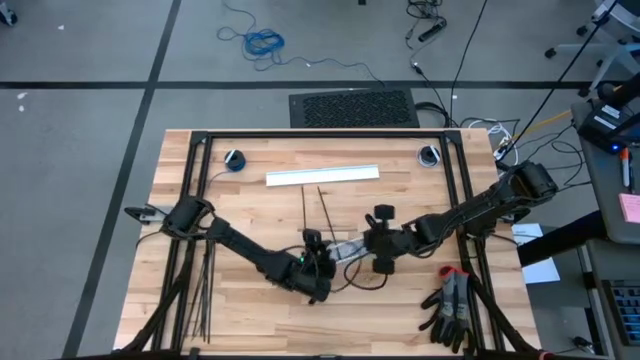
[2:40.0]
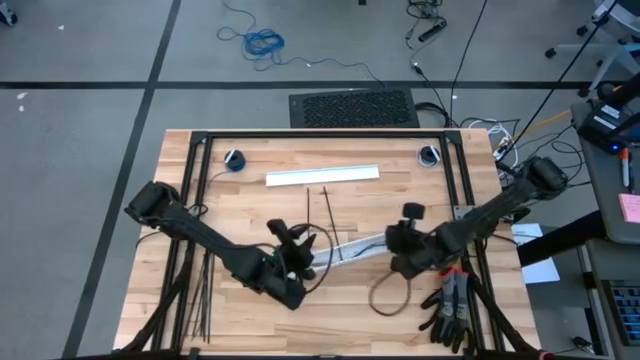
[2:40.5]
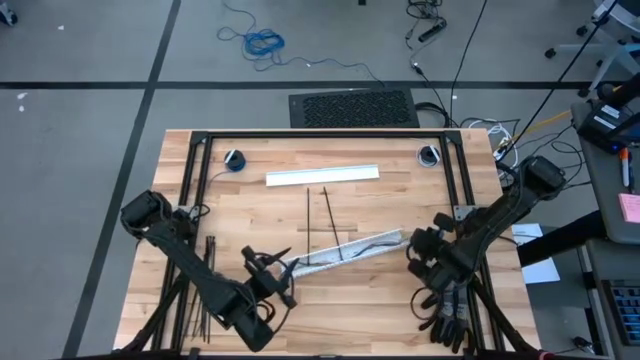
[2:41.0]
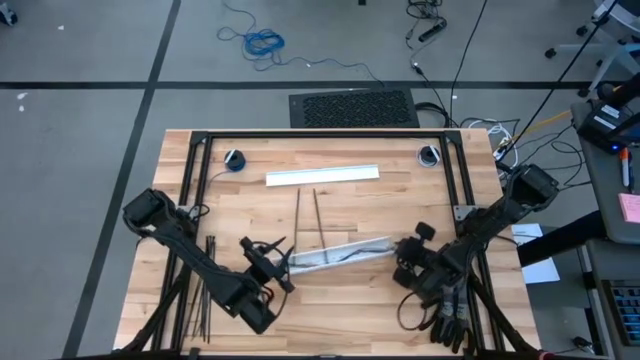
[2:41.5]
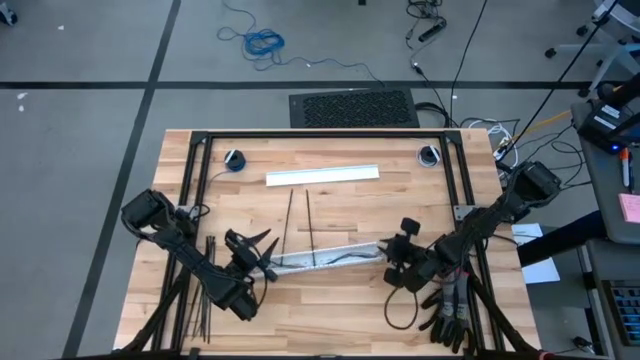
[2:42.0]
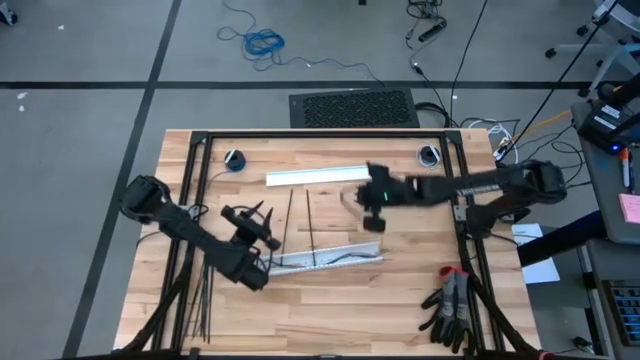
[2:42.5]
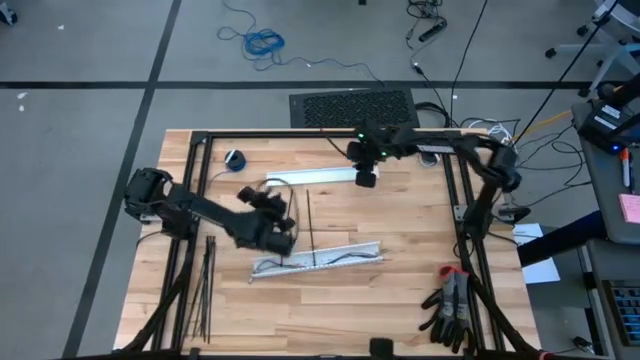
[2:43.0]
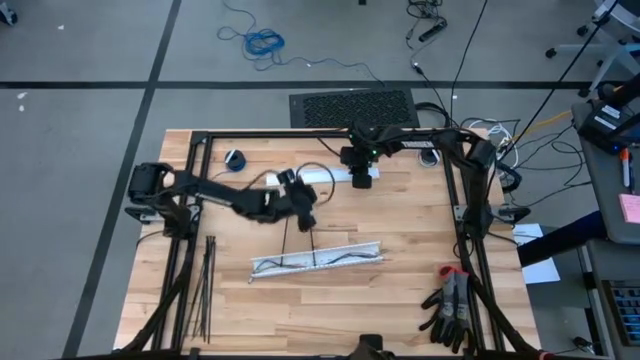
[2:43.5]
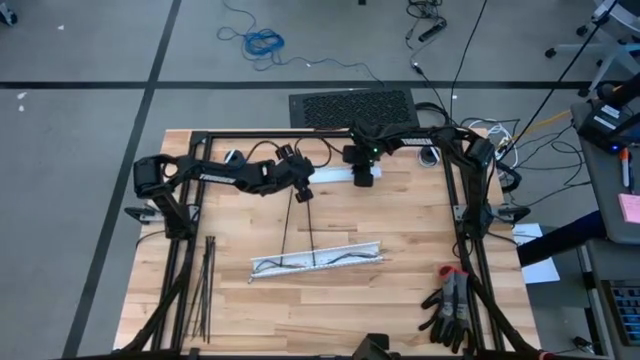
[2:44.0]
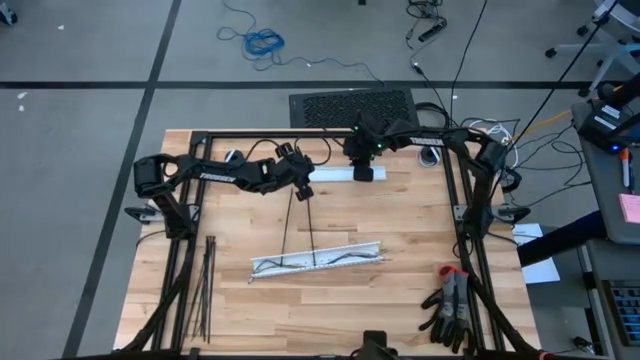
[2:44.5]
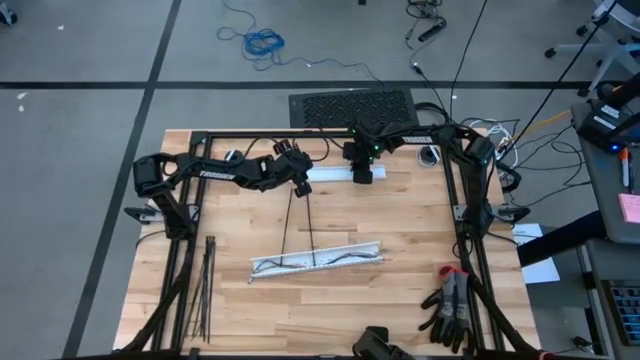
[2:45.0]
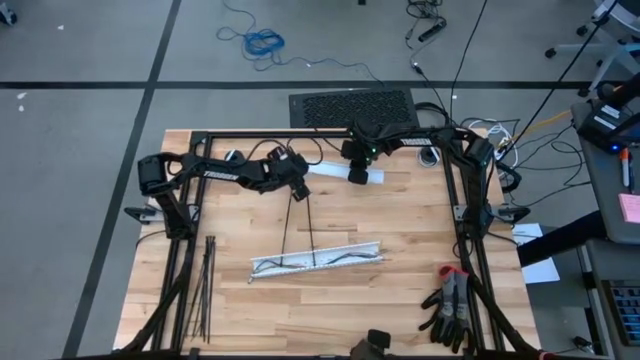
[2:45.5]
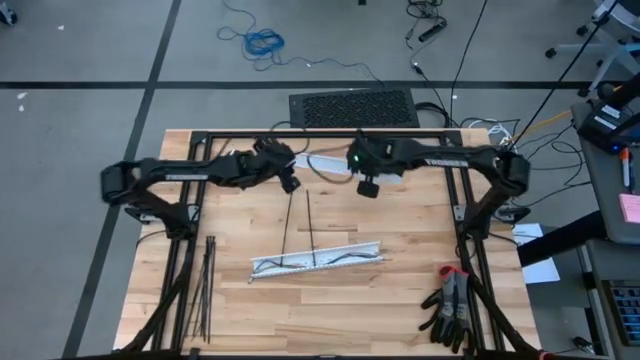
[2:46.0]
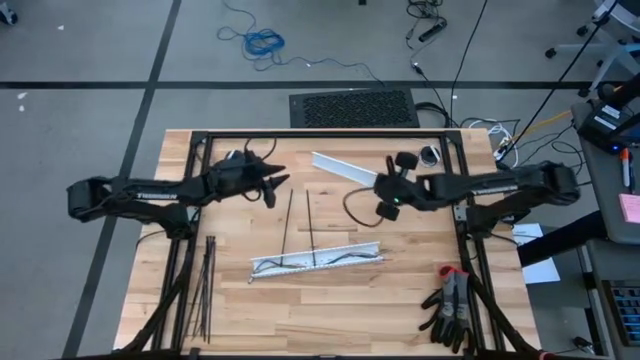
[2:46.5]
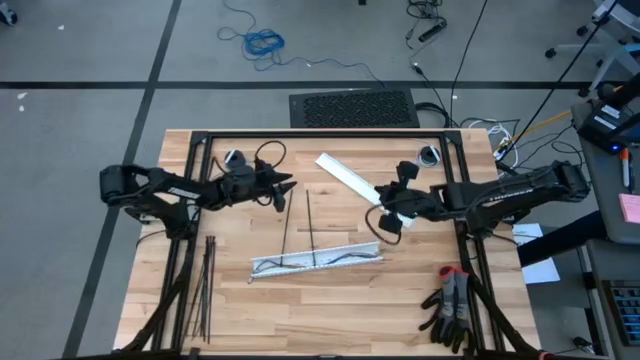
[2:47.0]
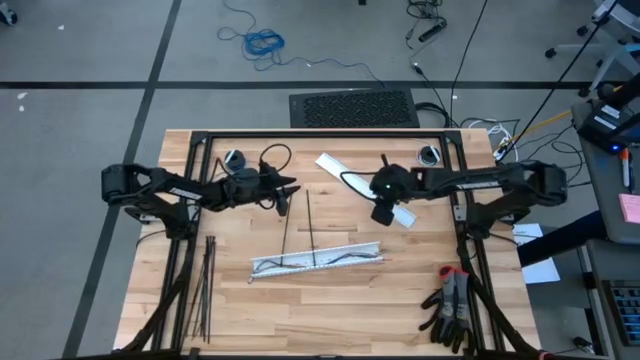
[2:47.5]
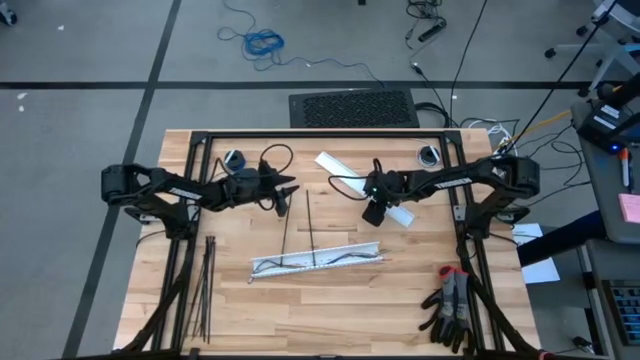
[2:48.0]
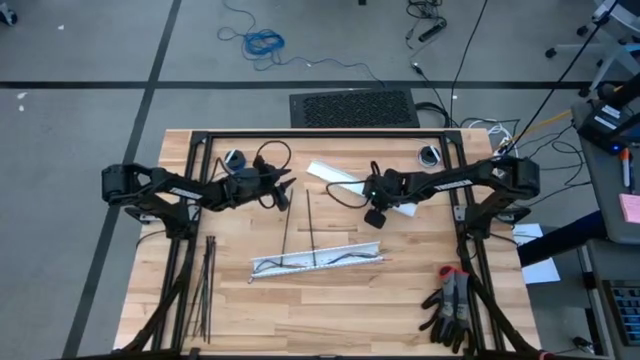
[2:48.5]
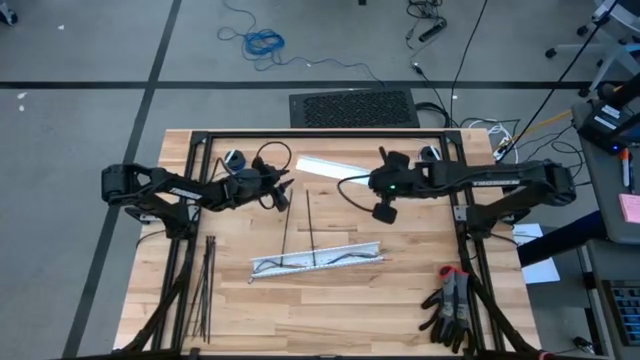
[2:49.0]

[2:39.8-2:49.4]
Task: Ziptie cables
Close the white cable duct

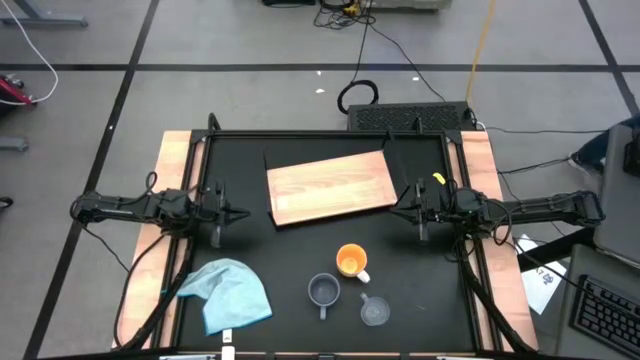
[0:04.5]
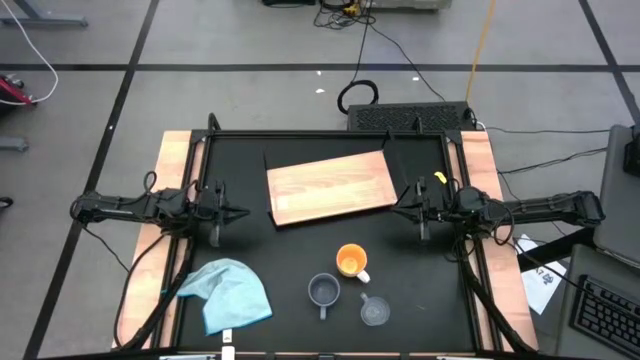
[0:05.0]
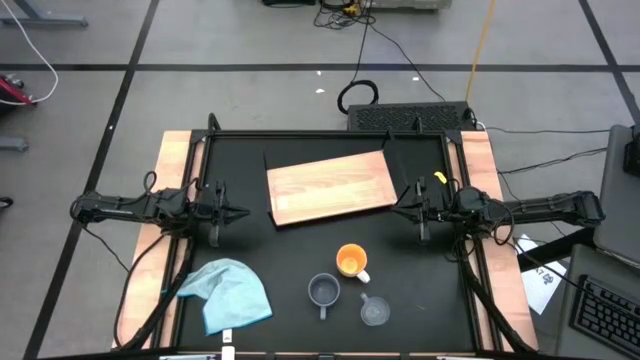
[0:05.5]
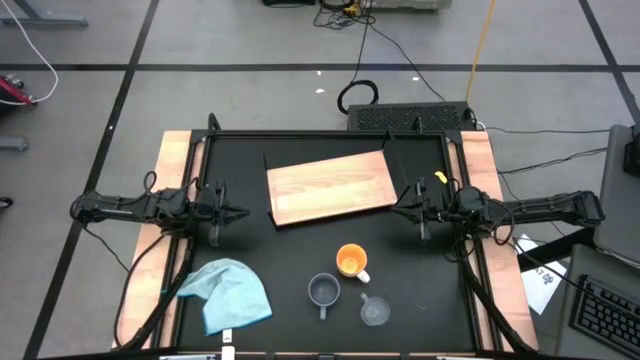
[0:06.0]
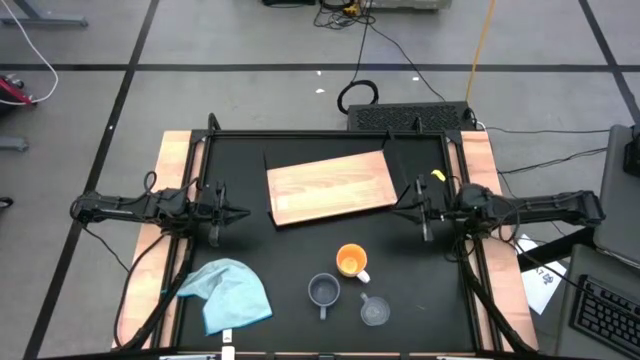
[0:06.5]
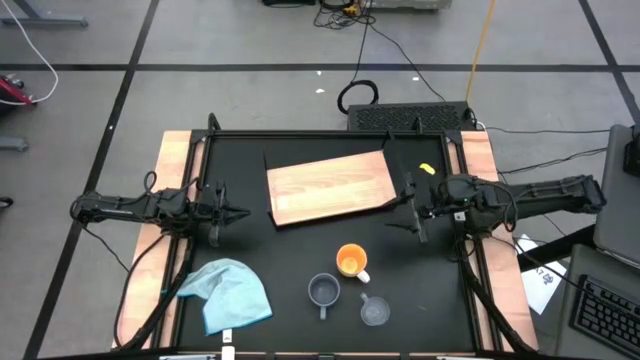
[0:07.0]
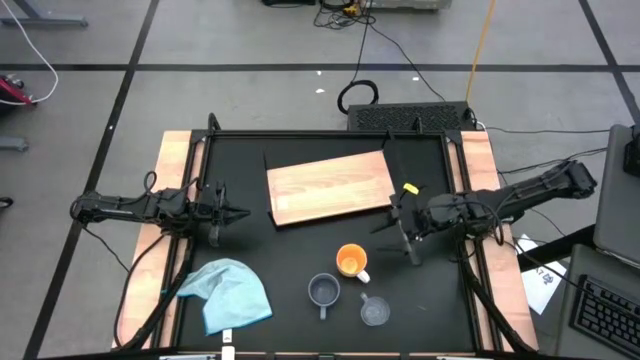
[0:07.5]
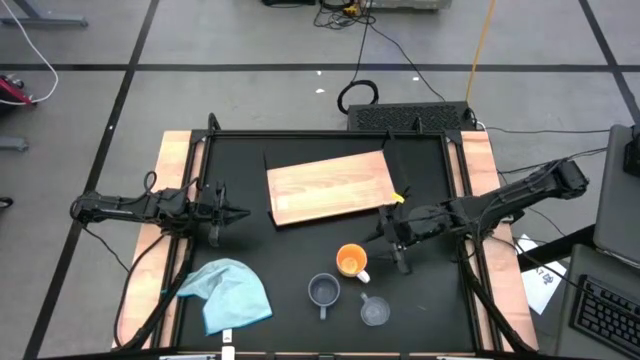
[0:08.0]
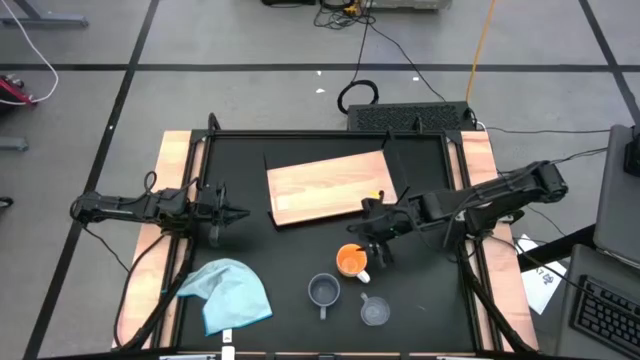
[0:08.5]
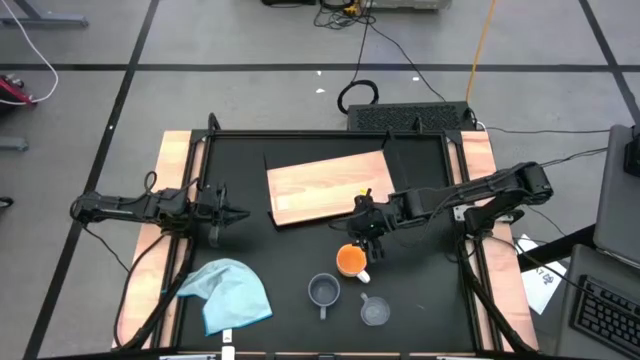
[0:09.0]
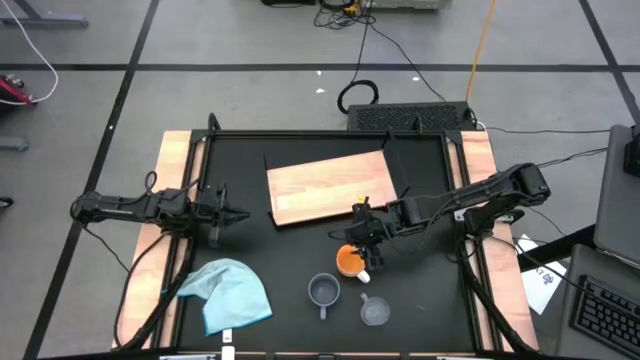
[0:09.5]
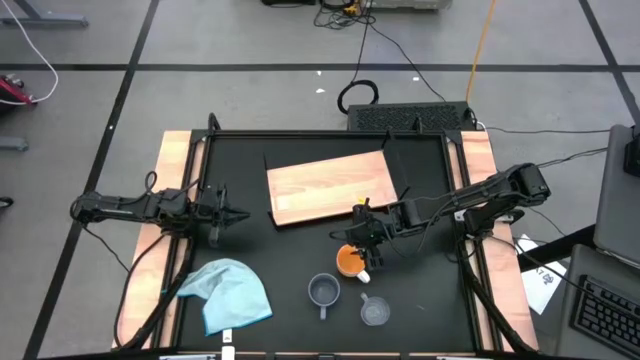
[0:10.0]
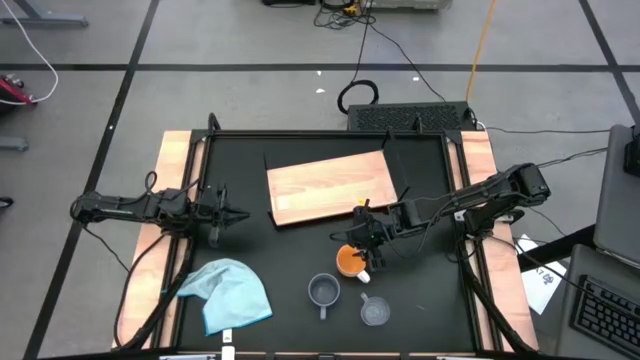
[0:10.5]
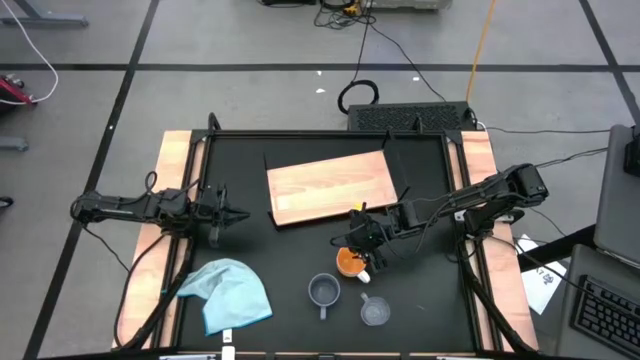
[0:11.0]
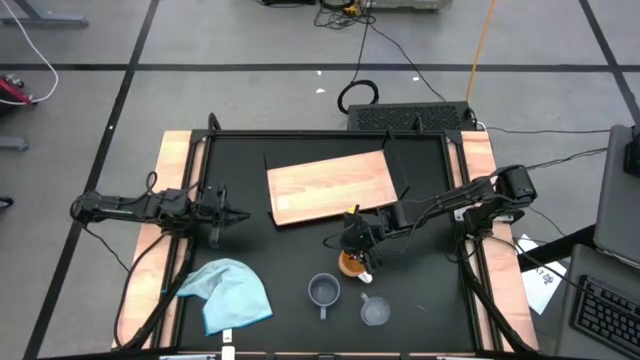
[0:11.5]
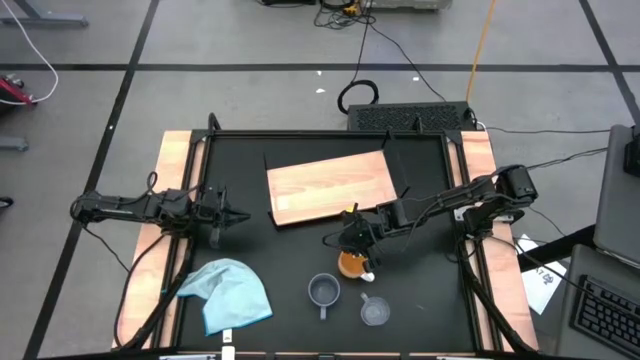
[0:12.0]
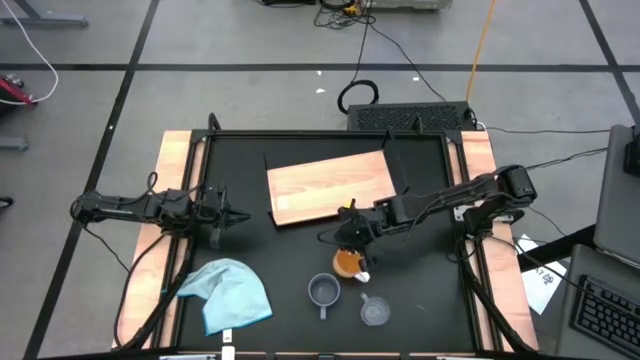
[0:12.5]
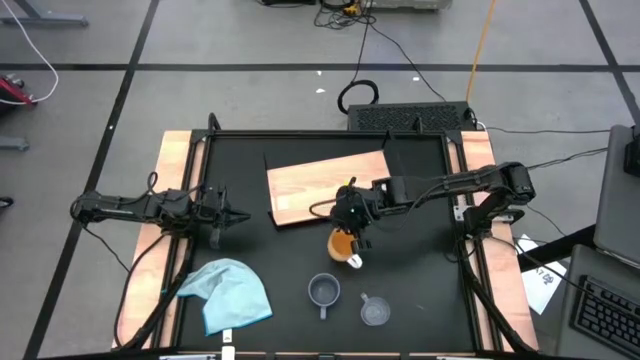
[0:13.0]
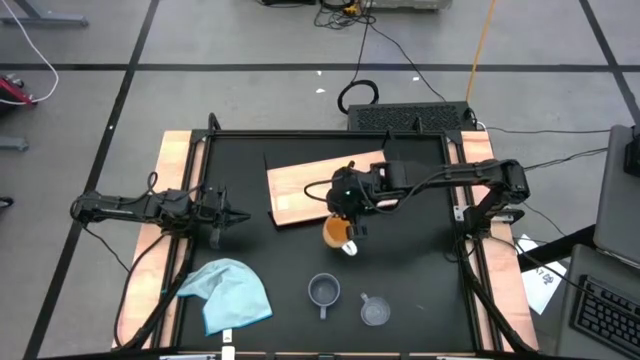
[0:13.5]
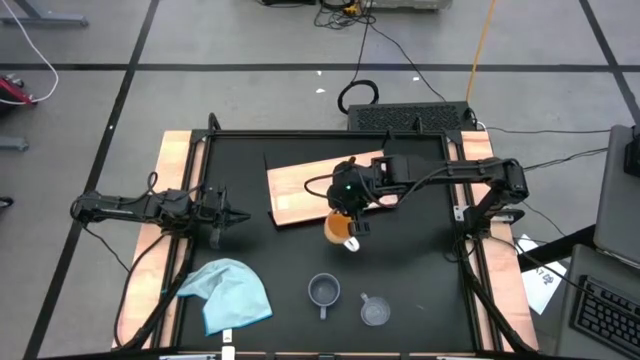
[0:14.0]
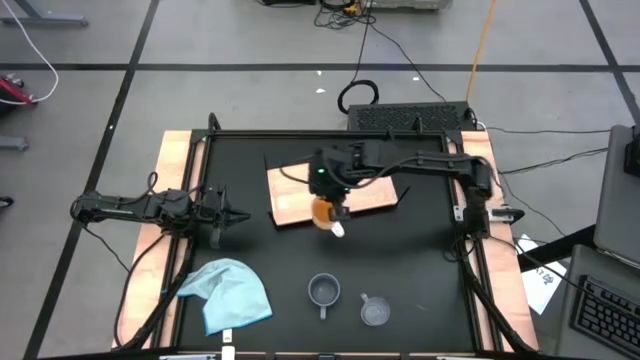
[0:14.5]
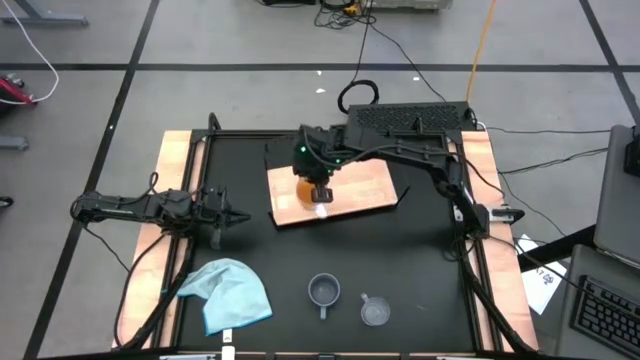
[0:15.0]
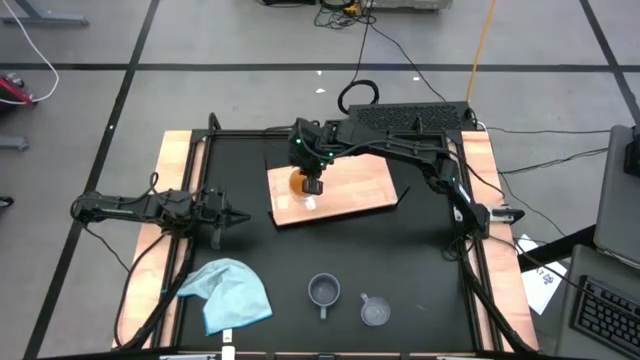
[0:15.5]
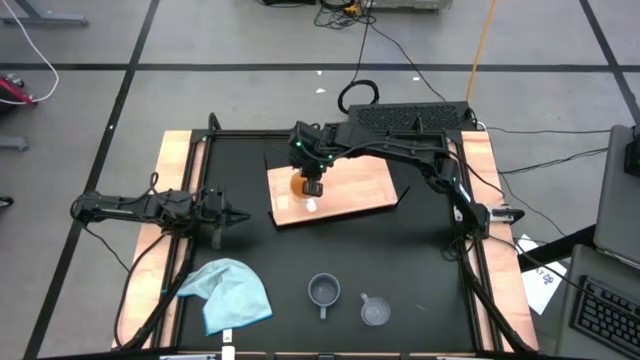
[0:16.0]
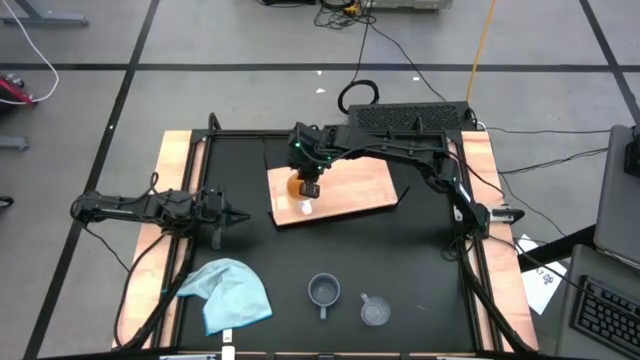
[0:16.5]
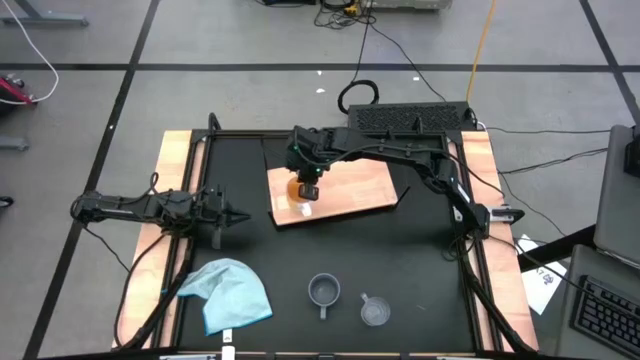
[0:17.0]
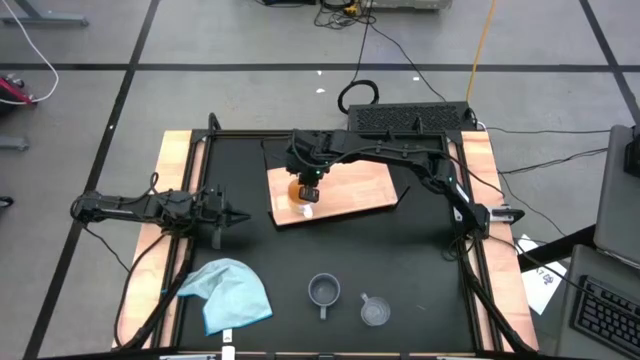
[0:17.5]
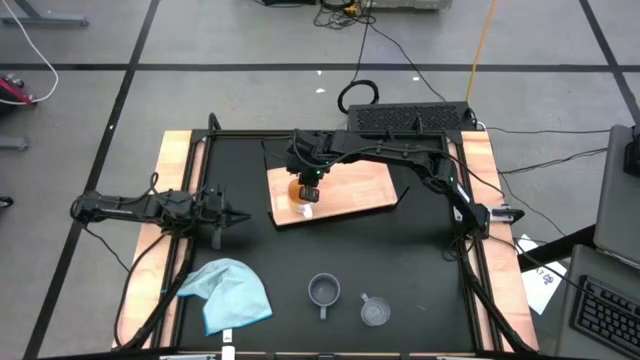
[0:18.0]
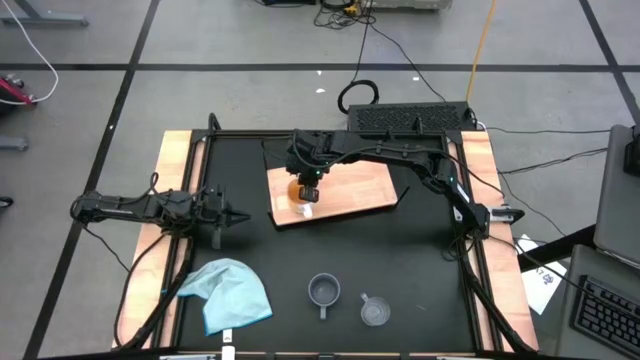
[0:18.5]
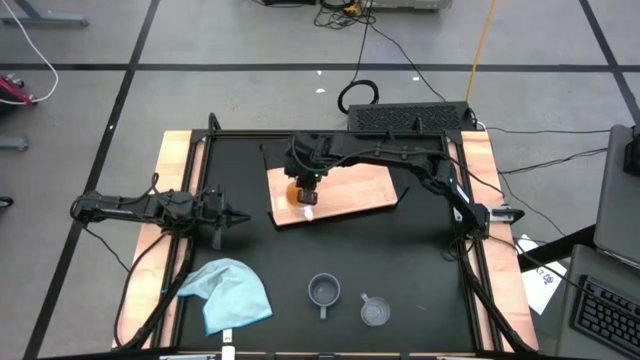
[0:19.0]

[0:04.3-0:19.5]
Task: Stack small to large cups/mugs on shelf
Put the yellow mug on the shelf
